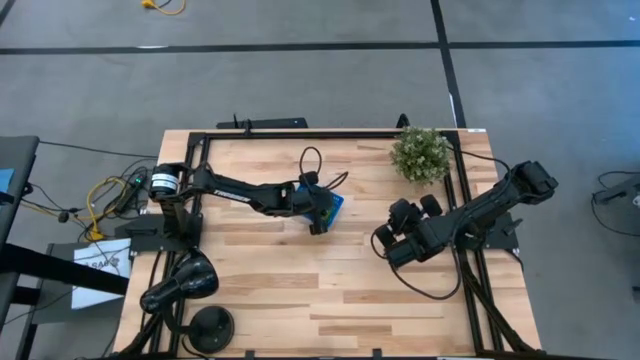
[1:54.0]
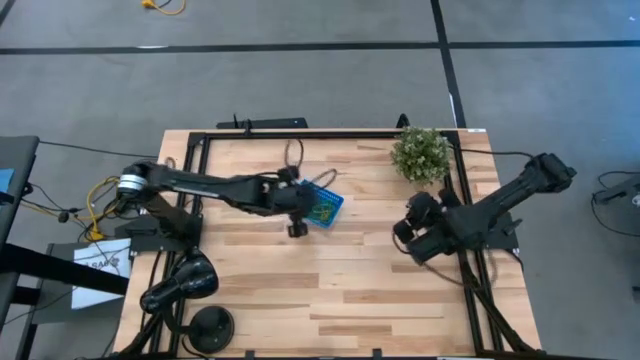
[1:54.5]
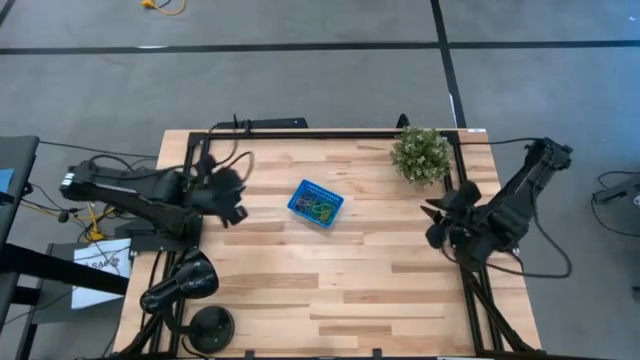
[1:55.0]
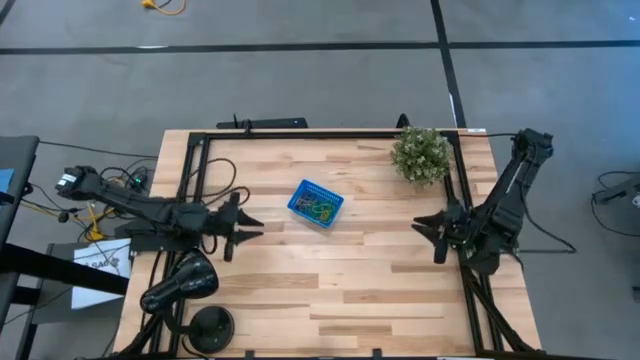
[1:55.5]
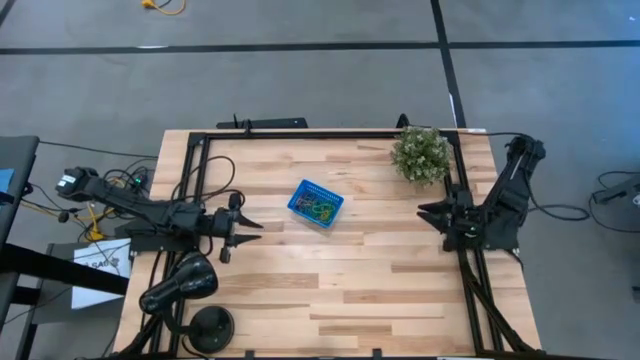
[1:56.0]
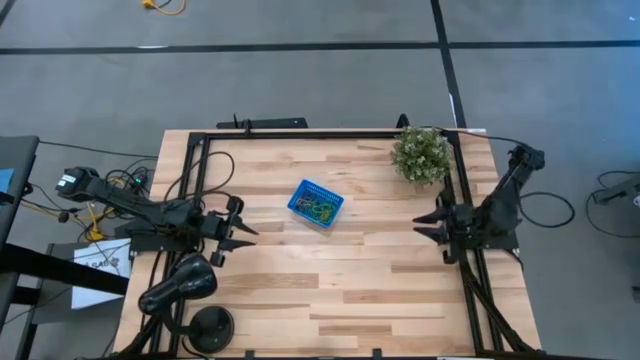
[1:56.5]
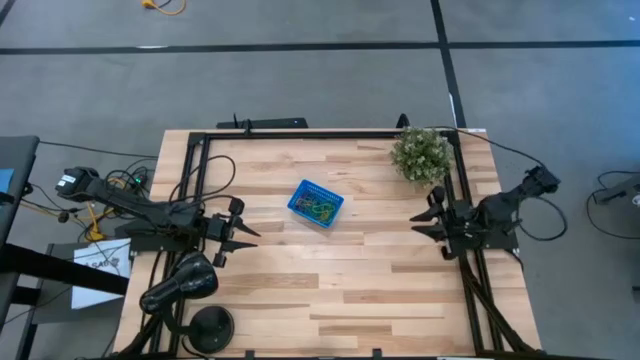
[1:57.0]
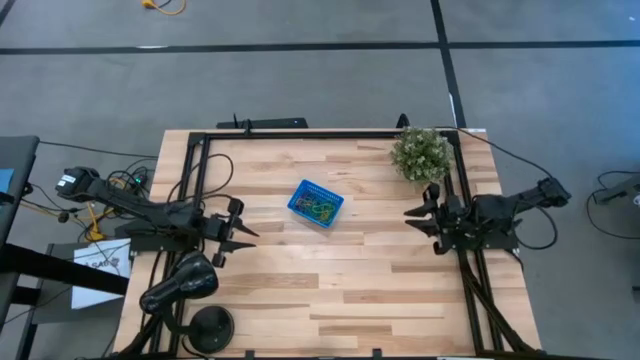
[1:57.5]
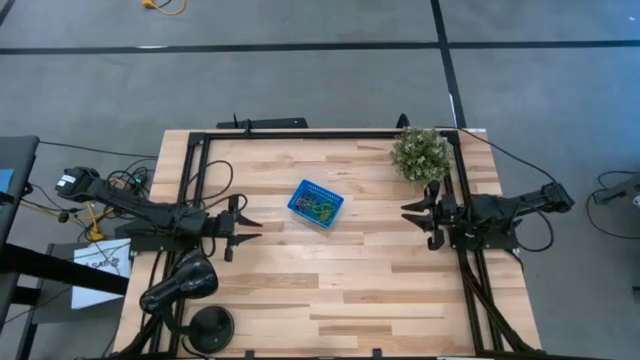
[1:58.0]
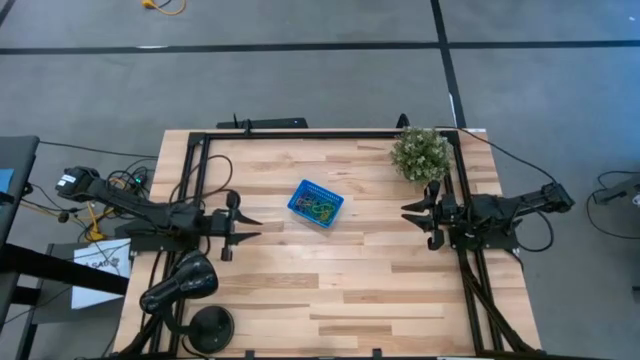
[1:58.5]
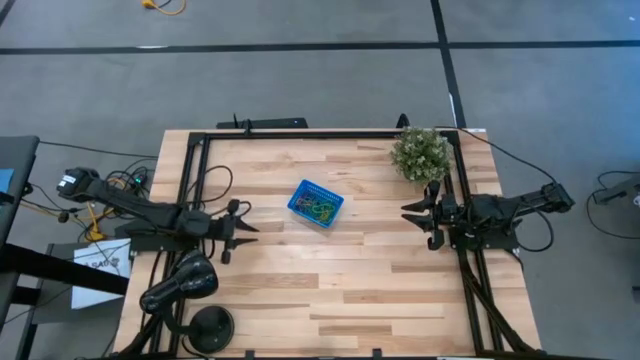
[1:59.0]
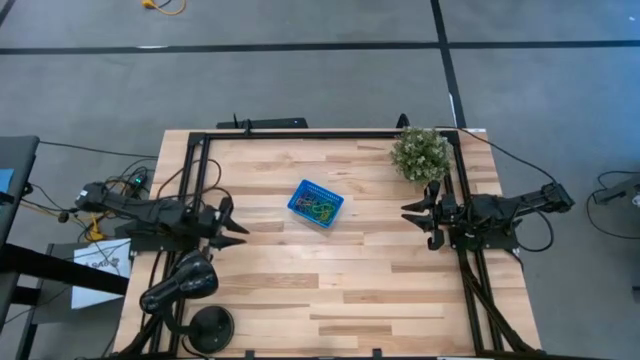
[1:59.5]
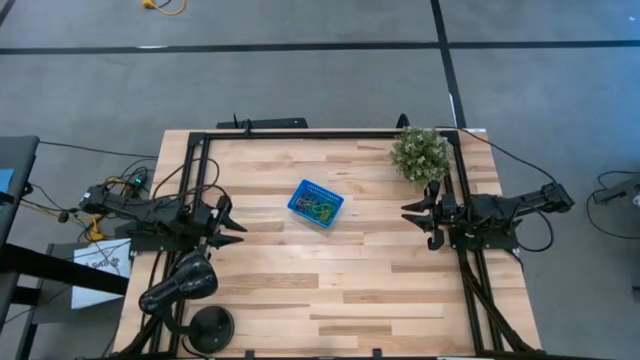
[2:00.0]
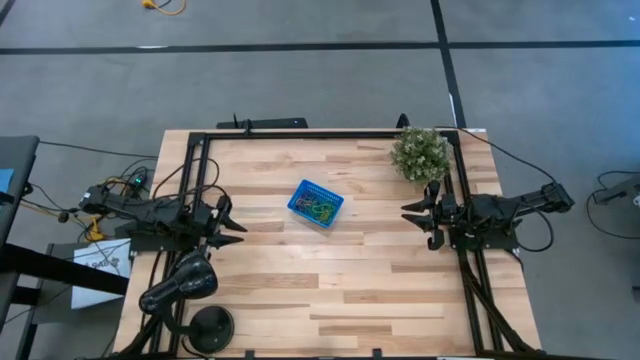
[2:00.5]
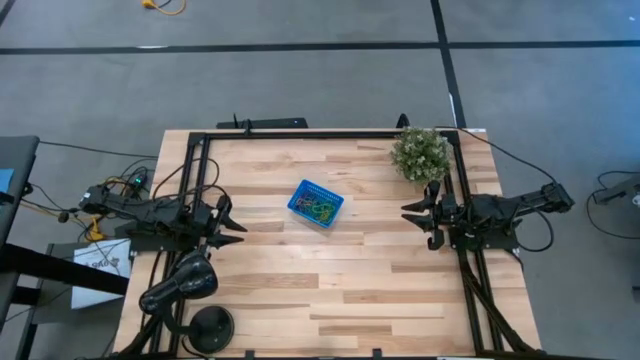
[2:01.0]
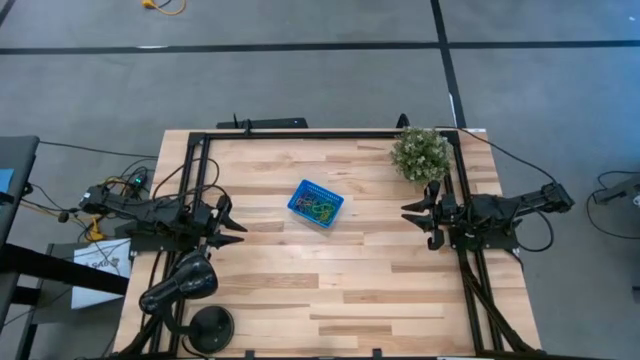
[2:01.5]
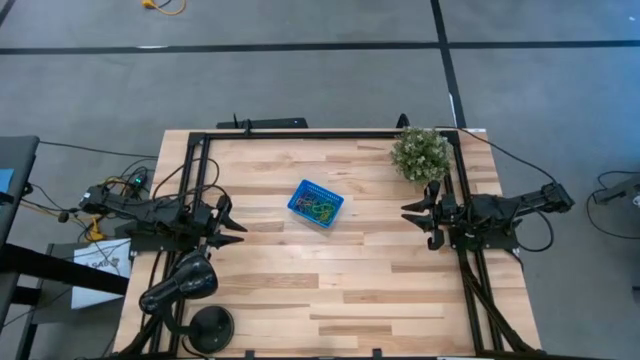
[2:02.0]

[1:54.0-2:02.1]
Task: Pick and place items into bin
Return to Home Position

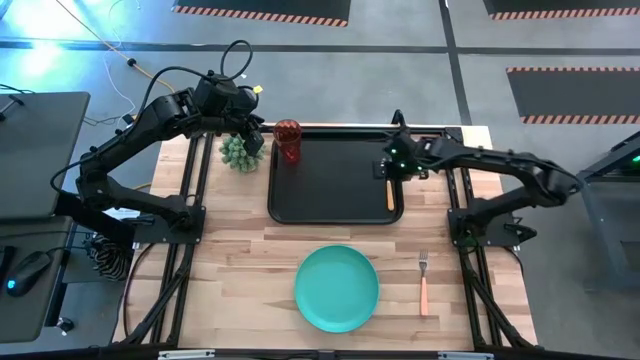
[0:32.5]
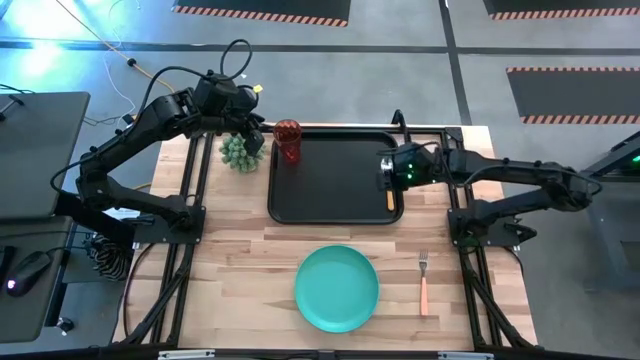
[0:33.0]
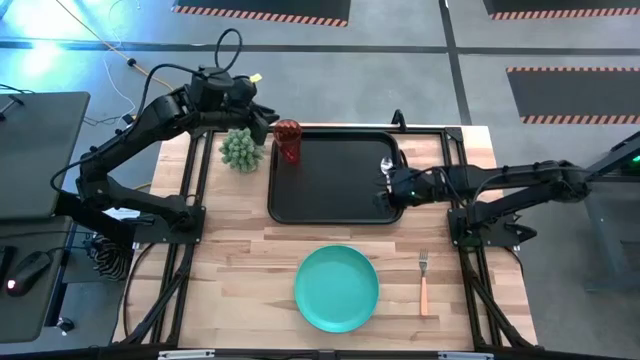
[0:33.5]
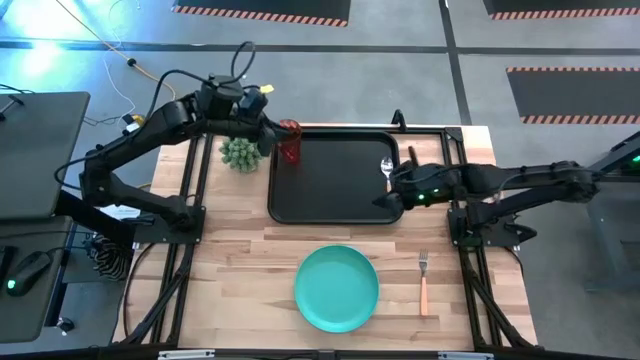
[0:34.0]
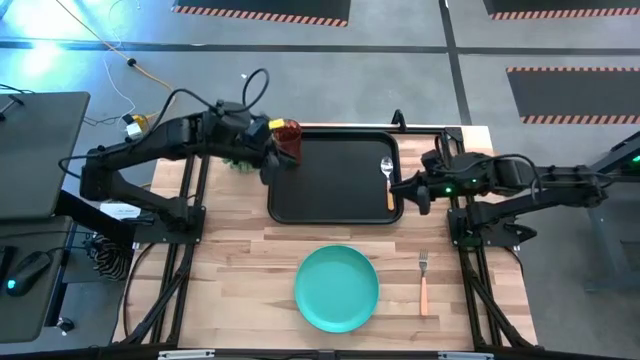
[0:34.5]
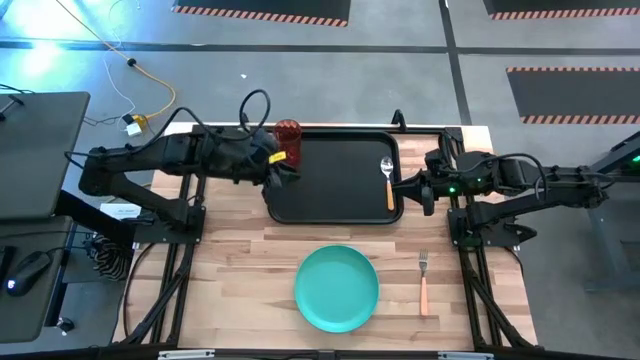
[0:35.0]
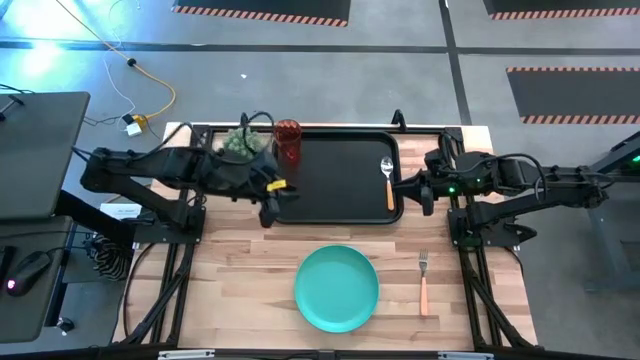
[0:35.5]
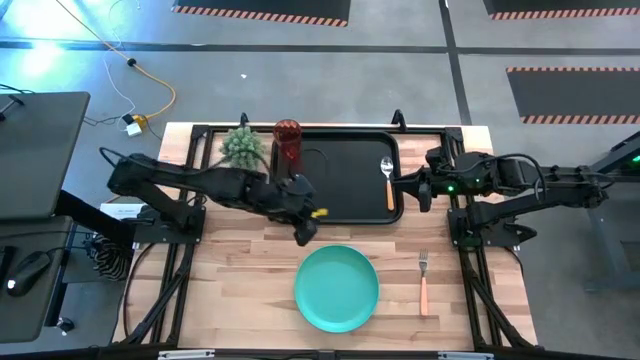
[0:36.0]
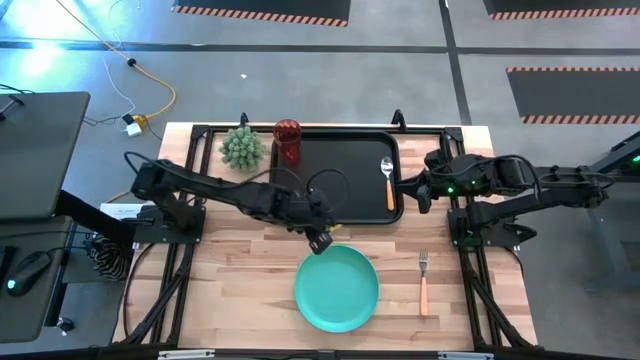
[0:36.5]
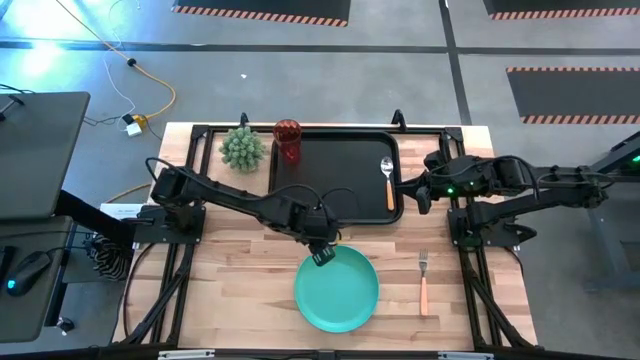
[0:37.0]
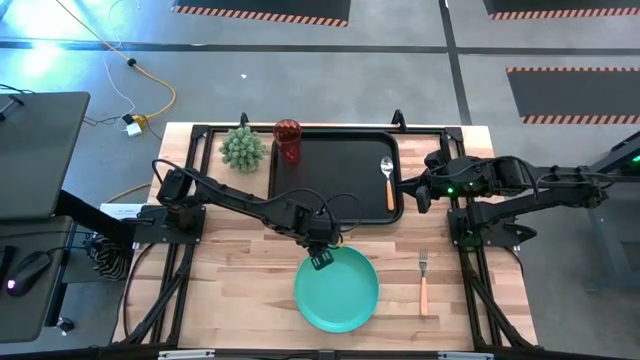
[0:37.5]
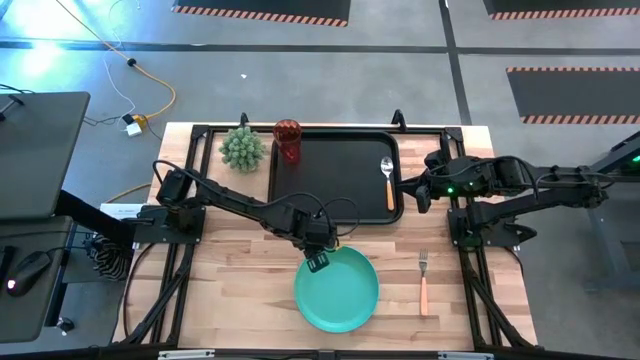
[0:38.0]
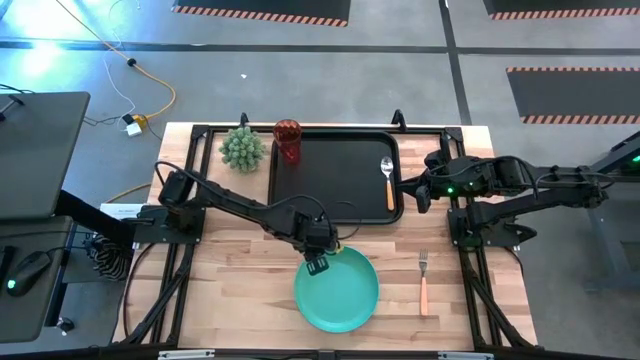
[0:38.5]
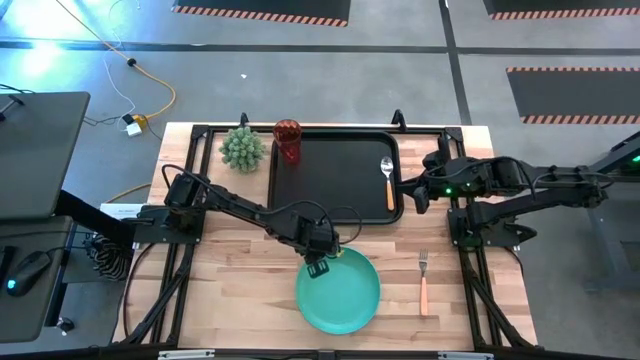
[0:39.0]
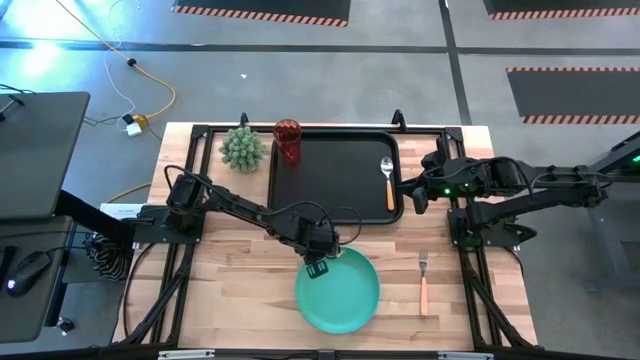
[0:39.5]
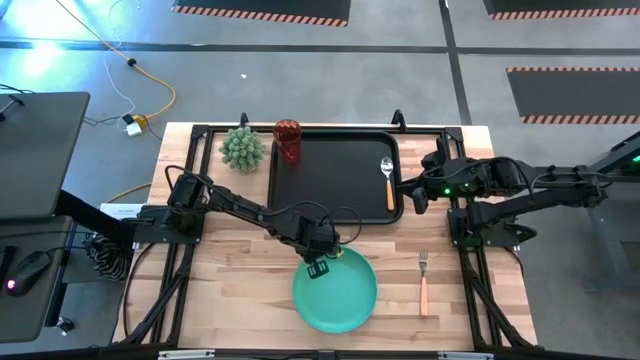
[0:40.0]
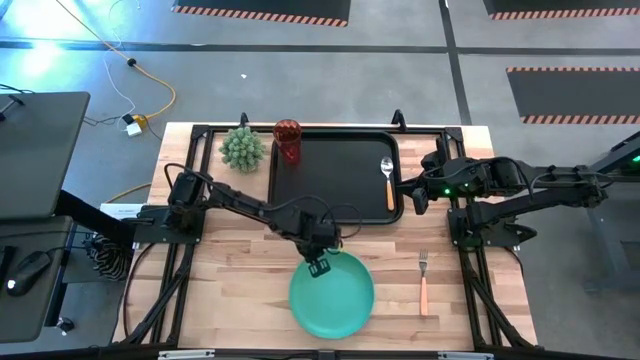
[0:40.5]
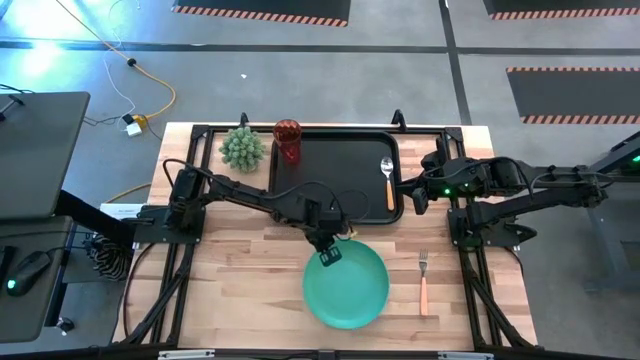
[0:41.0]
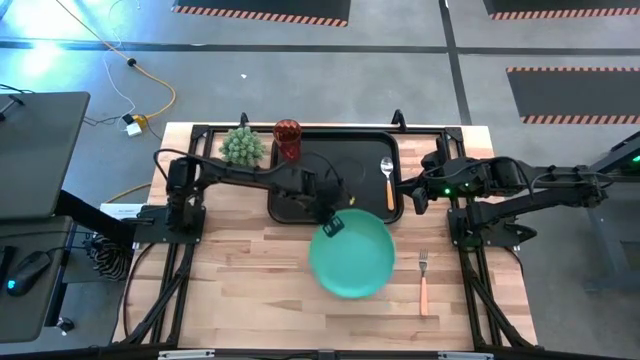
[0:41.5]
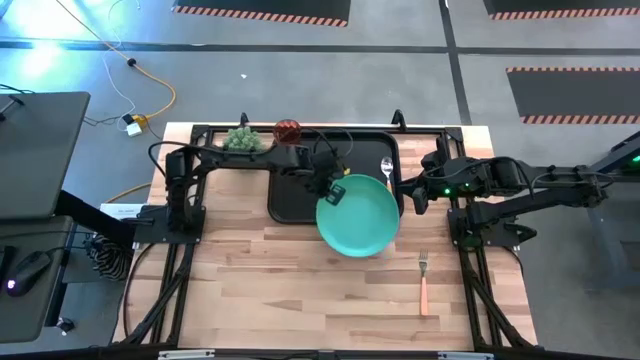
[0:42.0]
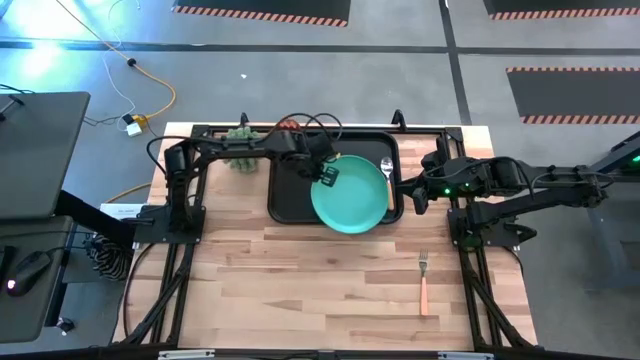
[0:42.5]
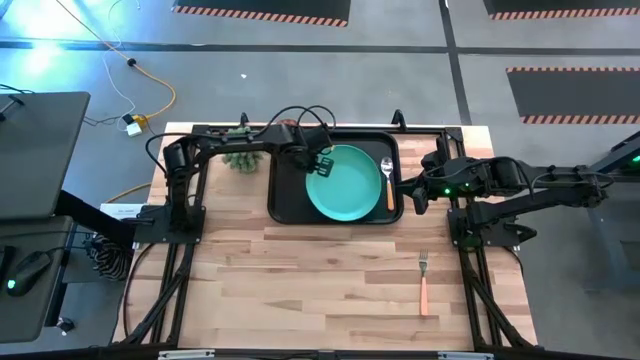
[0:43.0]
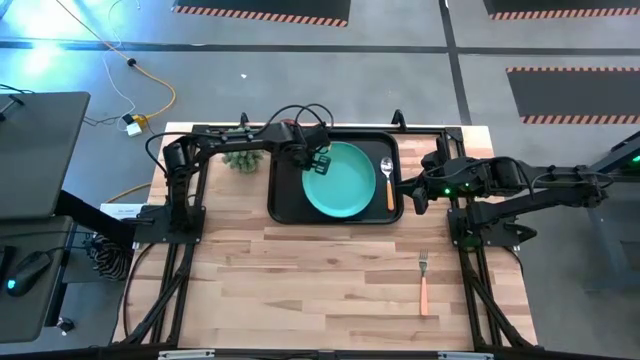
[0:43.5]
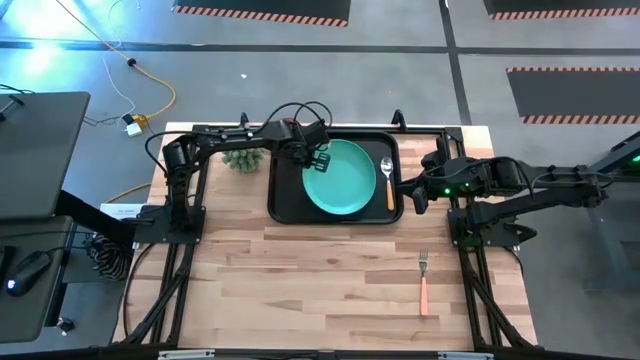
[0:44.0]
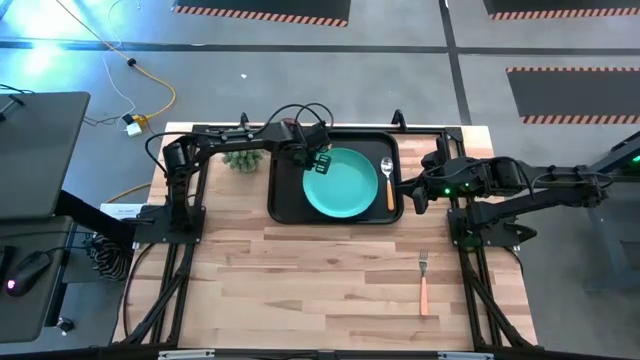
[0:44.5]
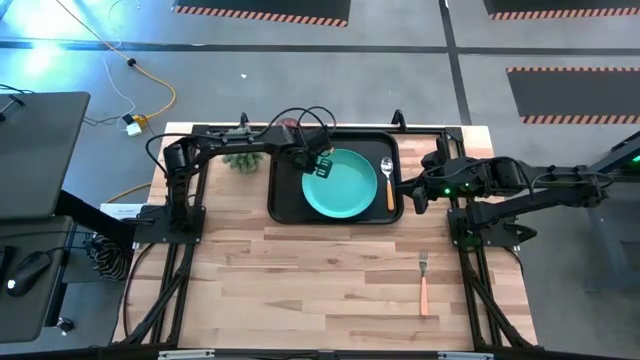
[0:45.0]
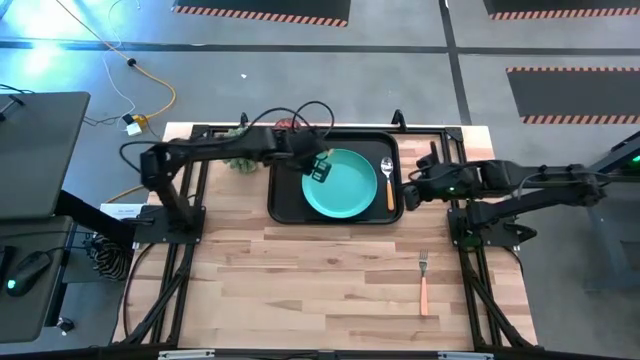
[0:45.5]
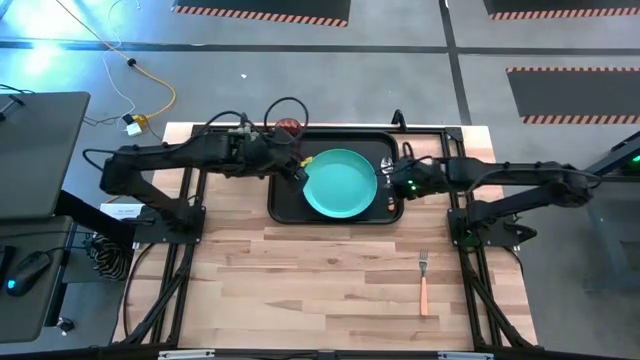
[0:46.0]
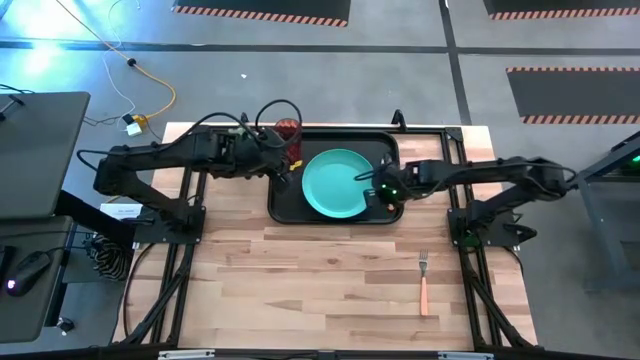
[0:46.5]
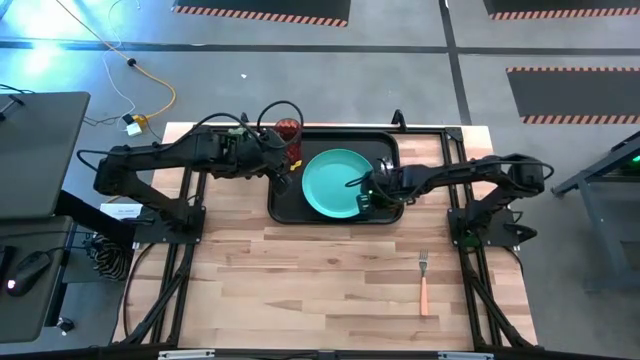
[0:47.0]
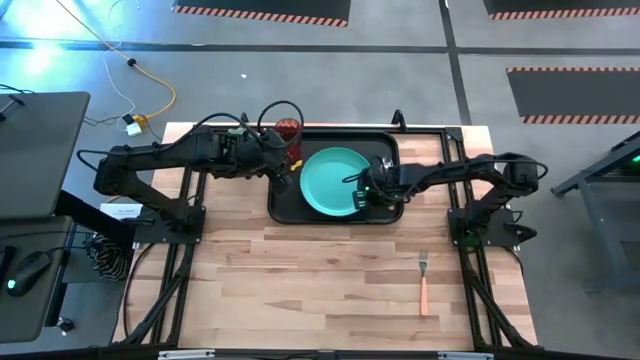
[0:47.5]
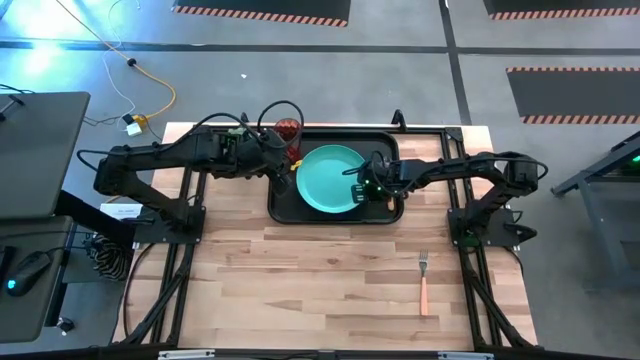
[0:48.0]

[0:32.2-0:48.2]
Task: Pick and place plate/cup/fork/spoon on tray
Put the light blue plate on the black tray
